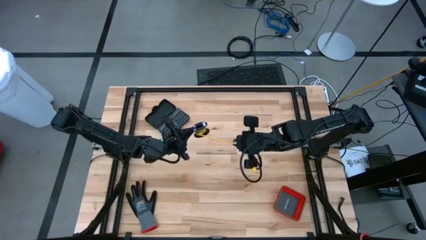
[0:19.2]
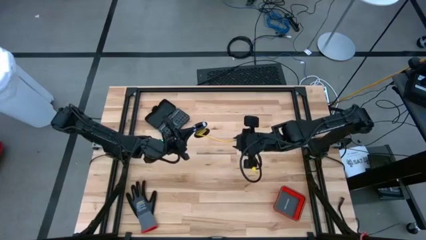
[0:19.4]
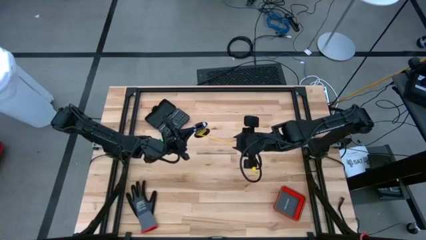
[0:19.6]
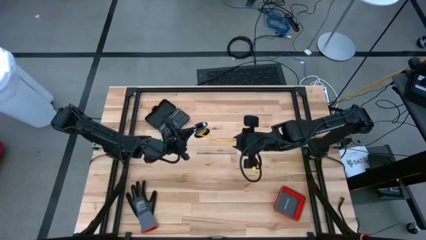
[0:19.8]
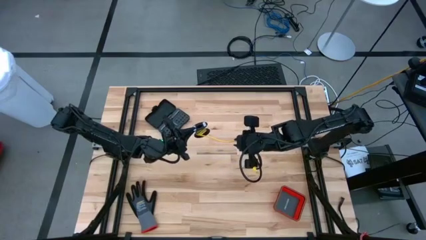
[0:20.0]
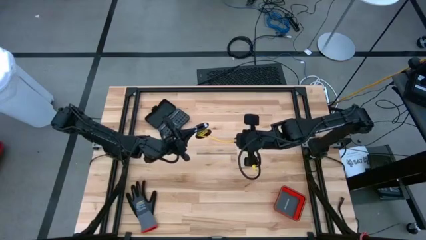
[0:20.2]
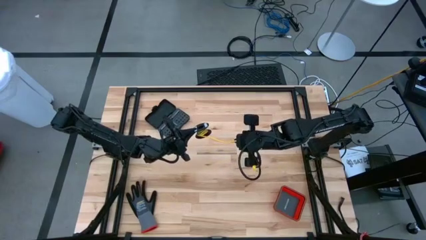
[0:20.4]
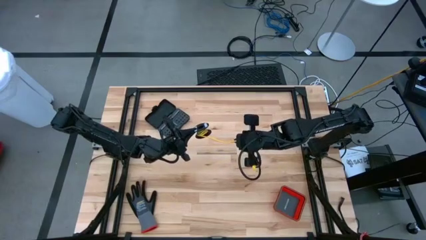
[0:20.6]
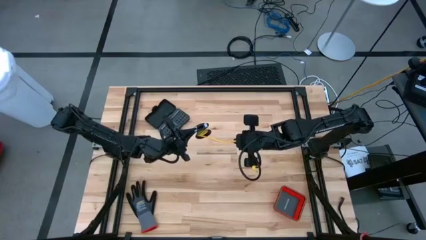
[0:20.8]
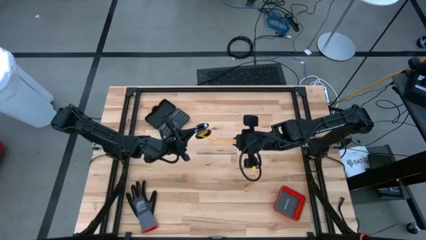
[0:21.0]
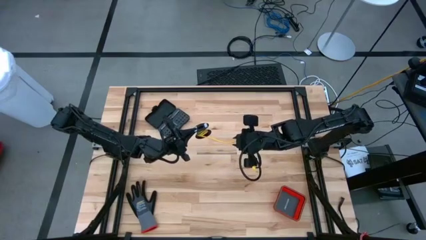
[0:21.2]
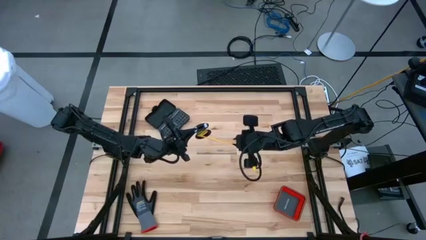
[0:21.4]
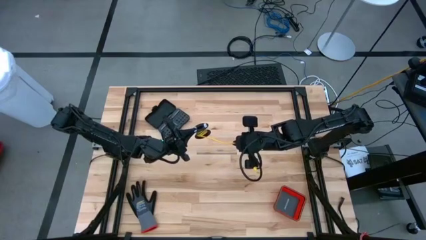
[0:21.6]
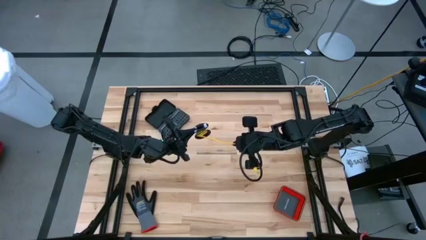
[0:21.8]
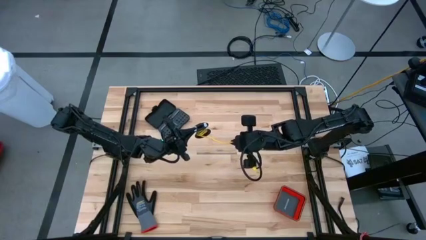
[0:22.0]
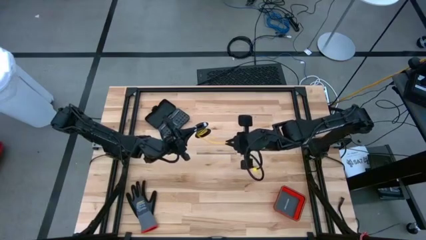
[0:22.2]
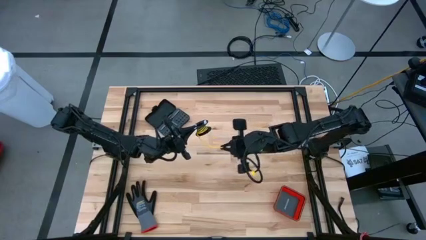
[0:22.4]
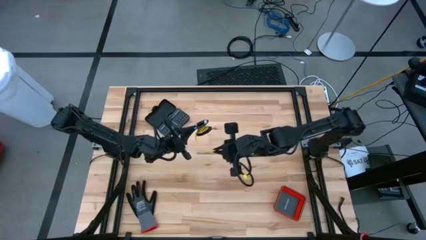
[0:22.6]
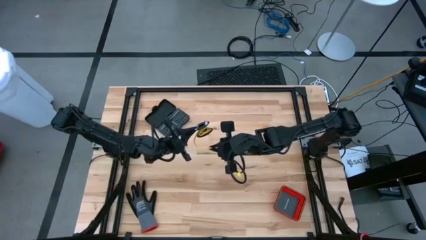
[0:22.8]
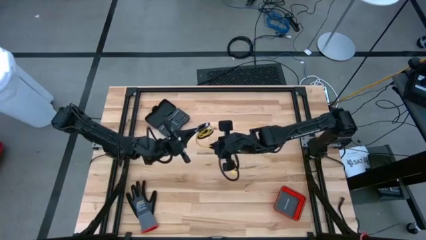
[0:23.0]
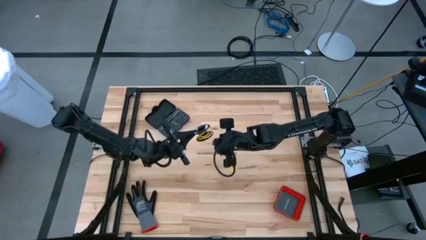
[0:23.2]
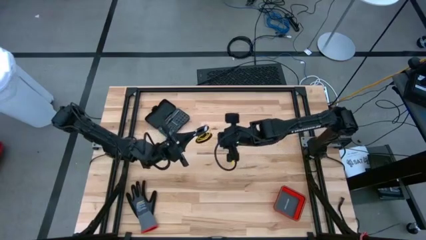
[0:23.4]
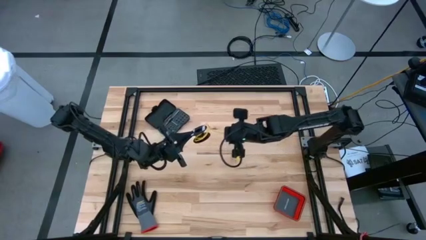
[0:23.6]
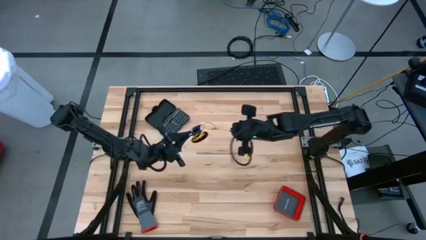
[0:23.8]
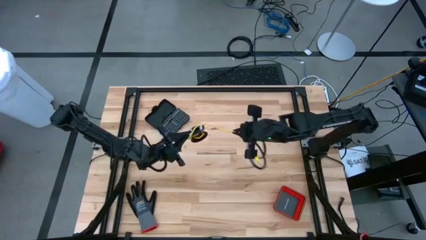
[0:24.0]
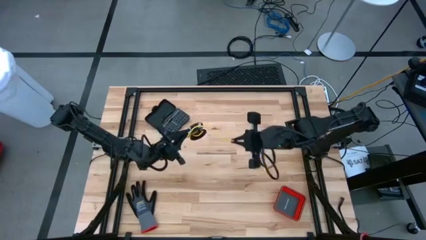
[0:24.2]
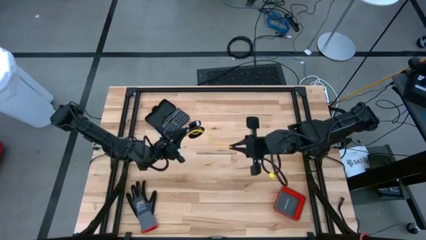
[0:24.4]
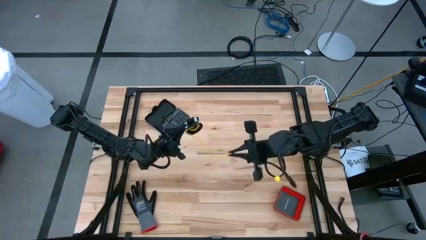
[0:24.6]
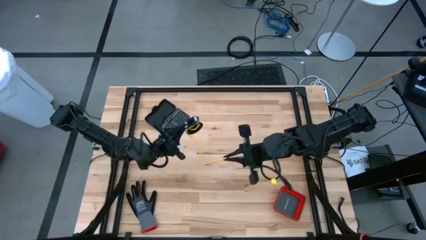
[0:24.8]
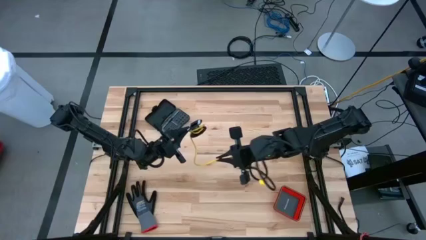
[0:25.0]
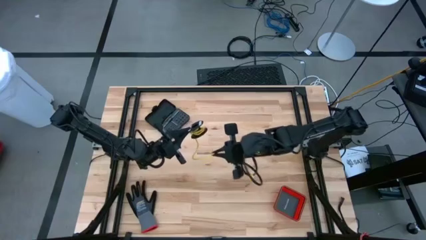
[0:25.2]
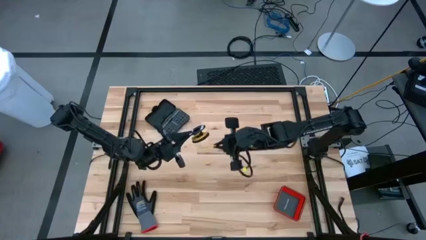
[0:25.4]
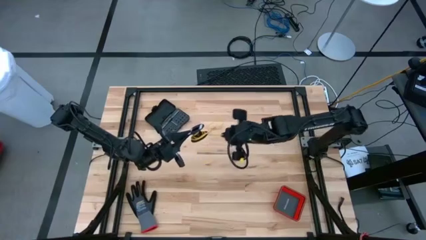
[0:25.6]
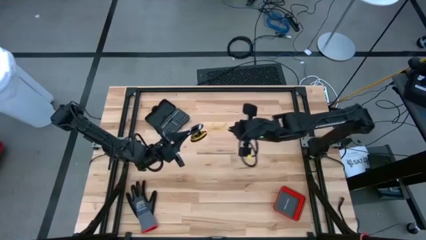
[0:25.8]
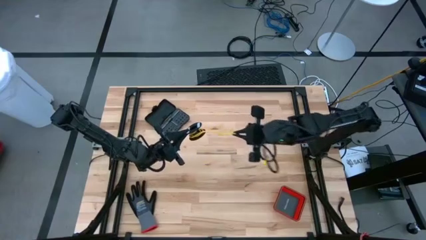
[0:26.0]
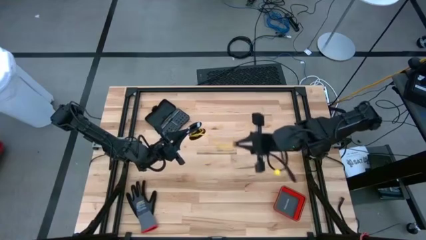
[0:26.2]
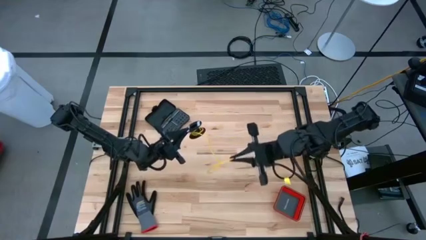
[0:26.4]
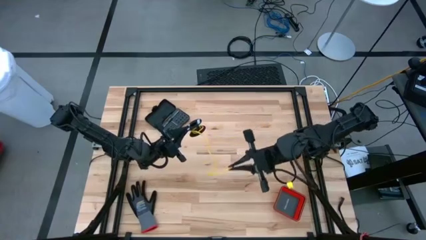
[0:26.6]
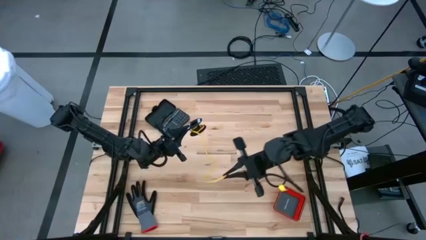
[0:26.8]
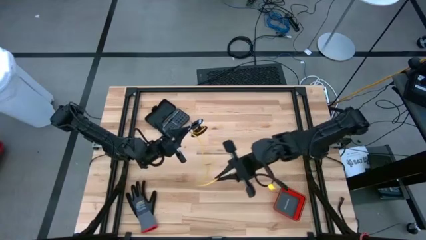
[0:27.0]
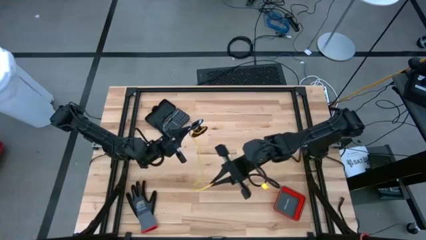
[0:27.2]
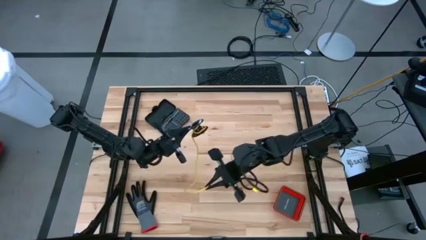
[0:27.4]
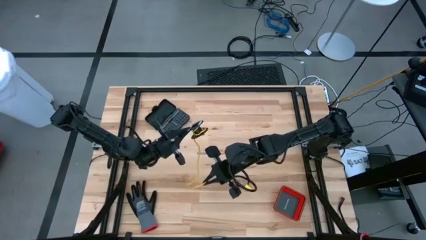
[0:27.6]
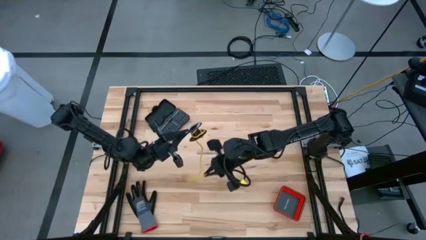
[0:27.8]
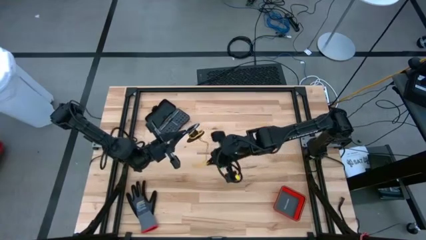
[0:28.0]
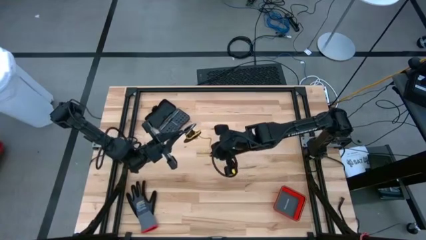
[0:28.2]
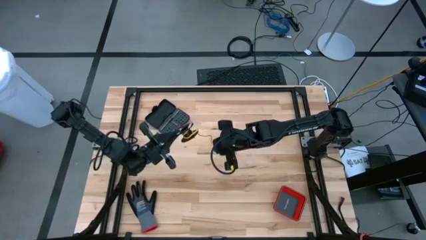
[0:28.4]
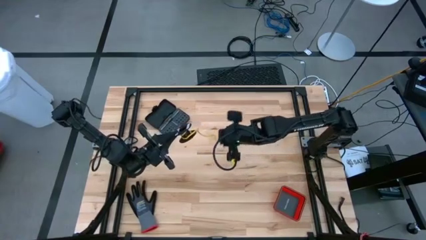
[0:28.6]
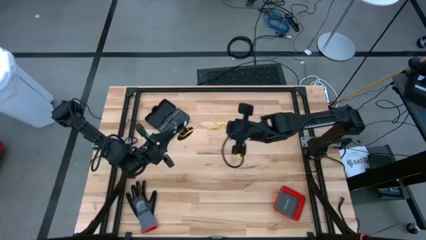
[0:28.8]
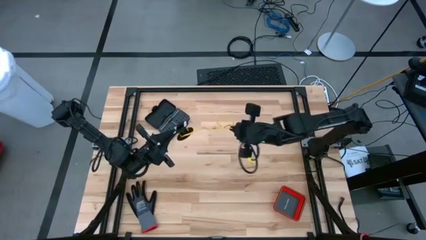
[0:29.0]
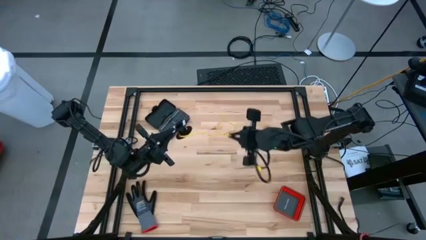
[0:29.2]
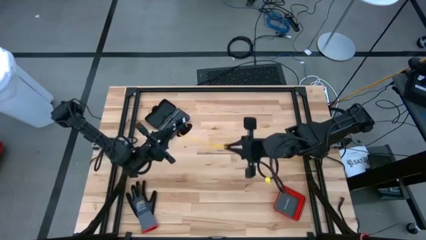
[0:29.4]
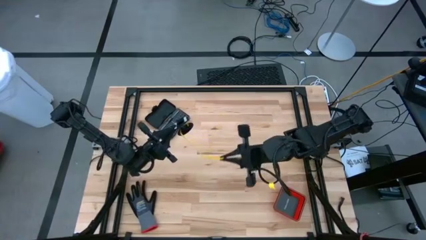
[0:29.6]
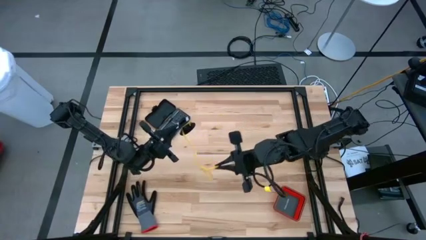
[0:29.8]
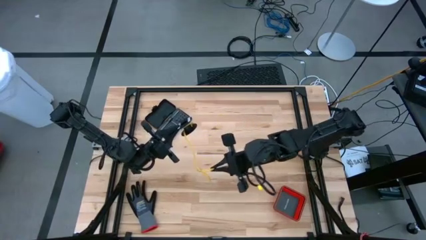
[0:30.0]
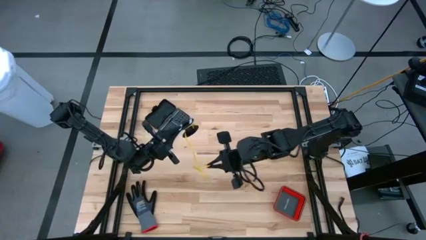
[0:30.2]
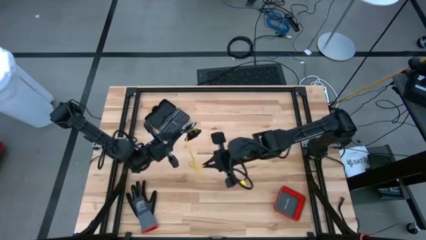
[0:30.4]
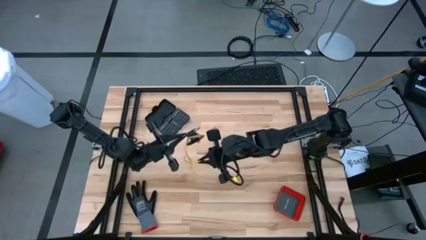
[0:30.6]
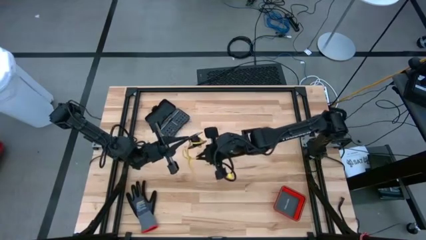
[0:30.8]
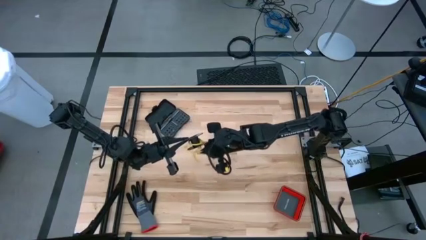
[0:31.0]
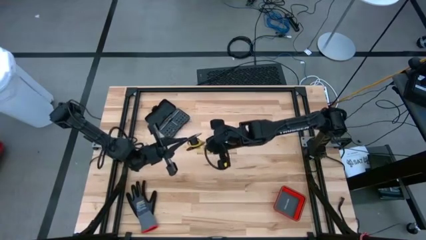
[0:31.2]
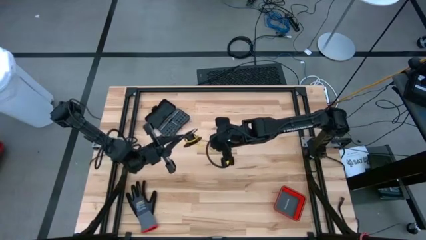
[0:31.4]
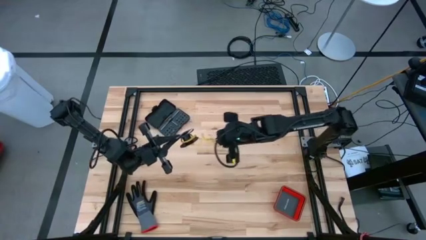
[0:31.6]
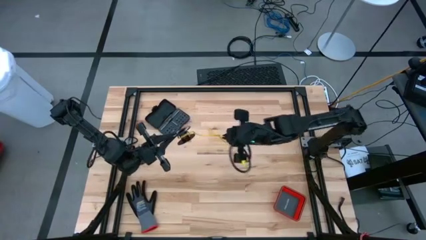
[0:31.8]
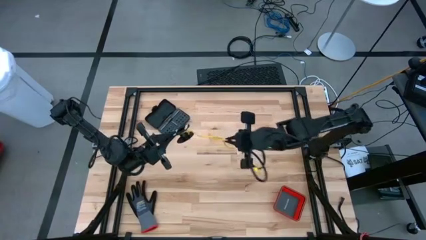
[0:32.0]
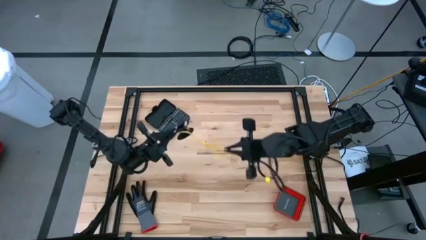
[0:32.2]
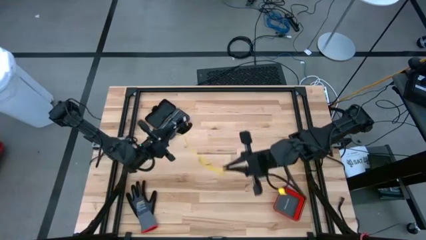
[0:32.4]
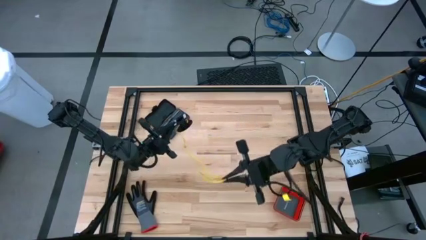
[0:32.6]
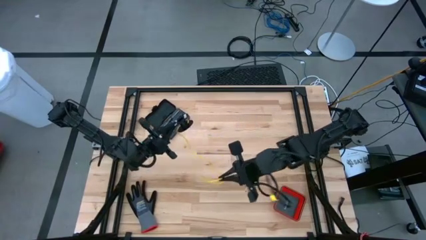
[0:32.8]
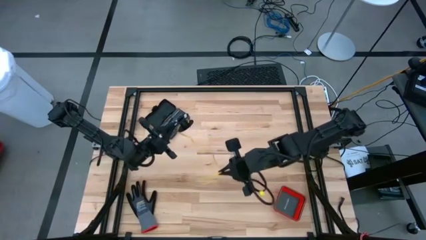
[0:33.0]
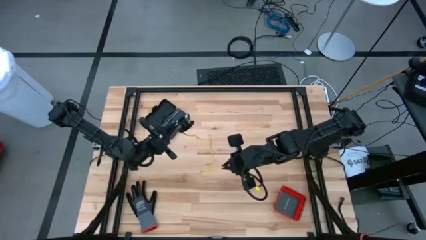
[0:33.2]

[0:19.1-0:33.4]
Task: Coil cords
Uncoil the yellow wire from the spool
